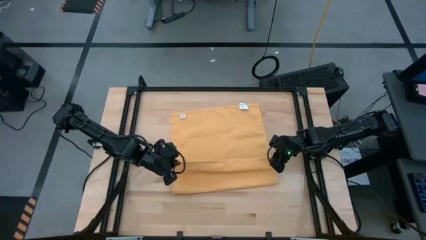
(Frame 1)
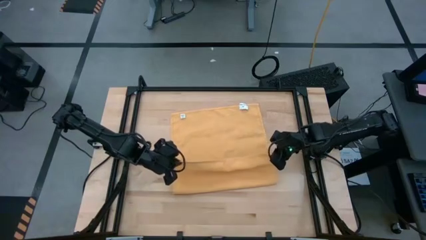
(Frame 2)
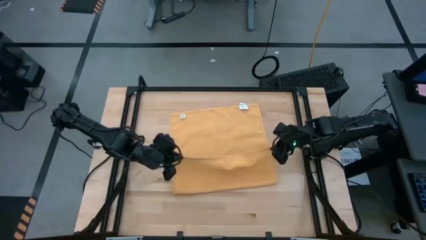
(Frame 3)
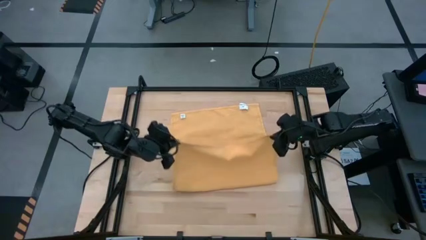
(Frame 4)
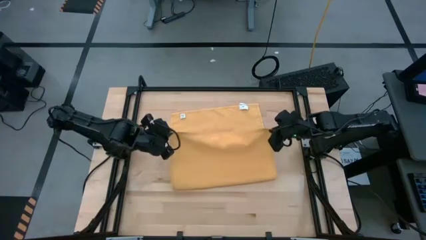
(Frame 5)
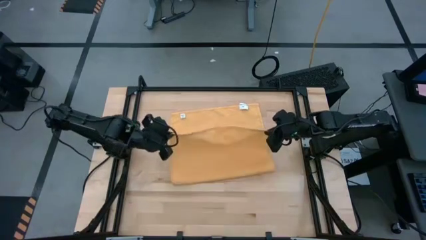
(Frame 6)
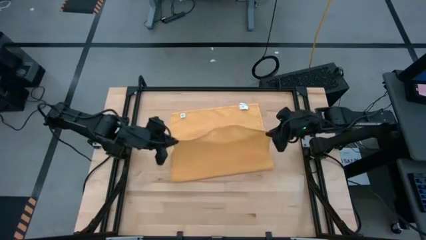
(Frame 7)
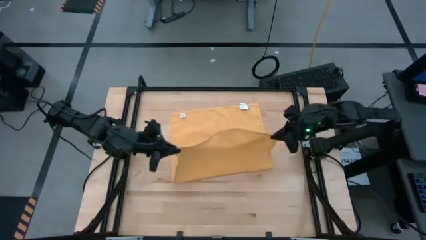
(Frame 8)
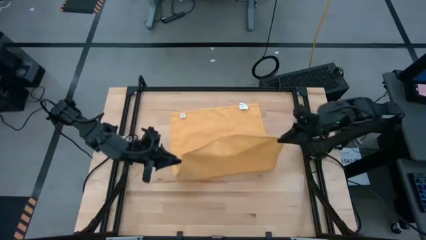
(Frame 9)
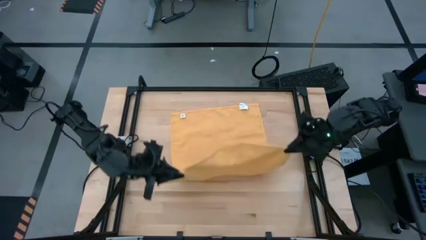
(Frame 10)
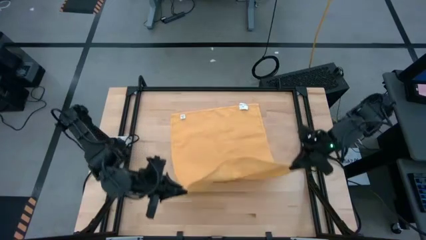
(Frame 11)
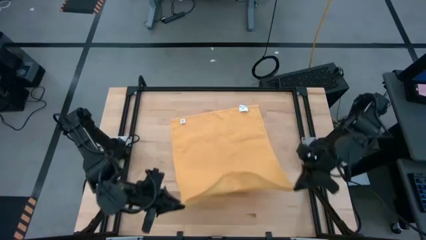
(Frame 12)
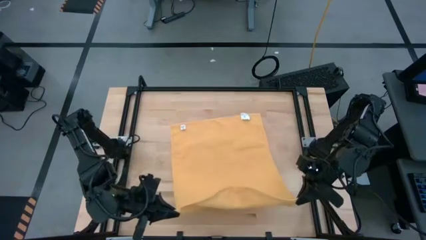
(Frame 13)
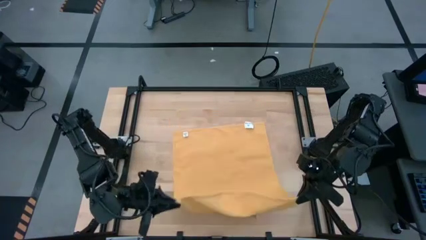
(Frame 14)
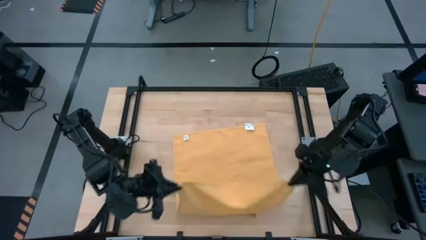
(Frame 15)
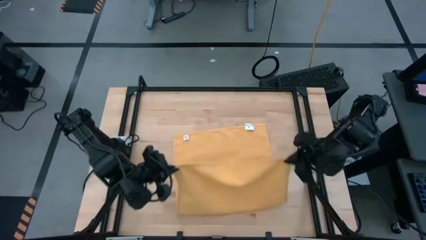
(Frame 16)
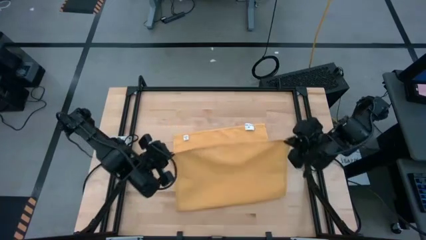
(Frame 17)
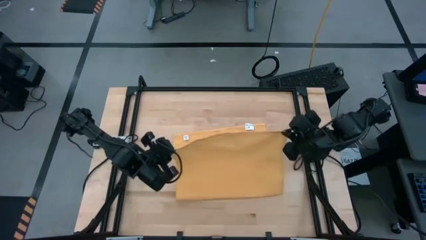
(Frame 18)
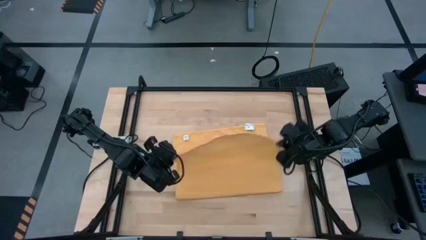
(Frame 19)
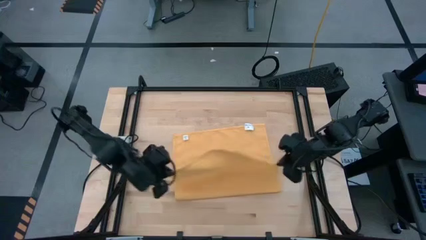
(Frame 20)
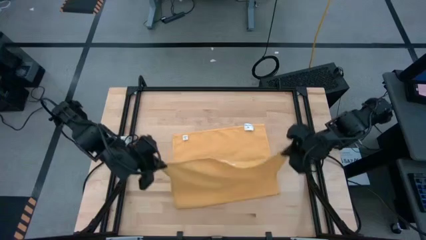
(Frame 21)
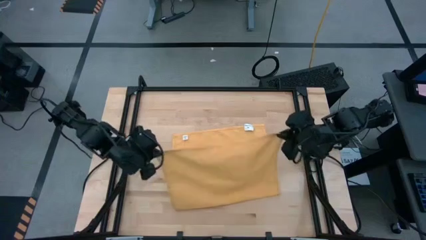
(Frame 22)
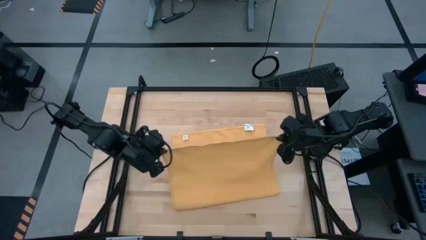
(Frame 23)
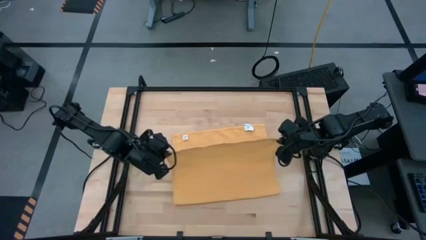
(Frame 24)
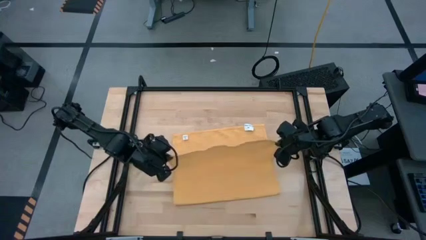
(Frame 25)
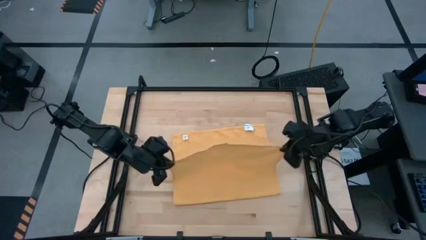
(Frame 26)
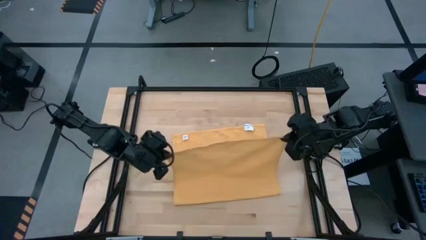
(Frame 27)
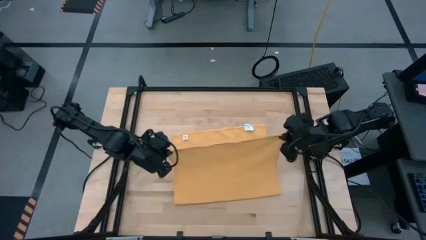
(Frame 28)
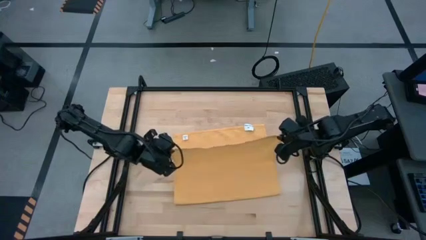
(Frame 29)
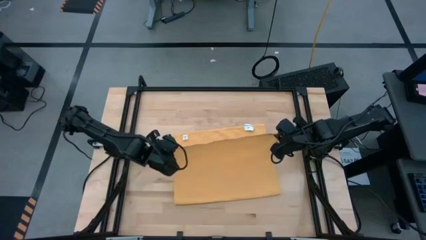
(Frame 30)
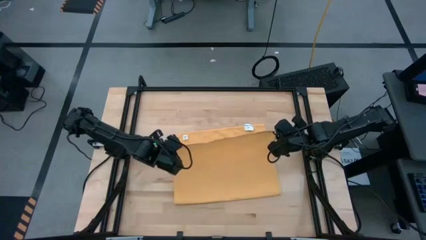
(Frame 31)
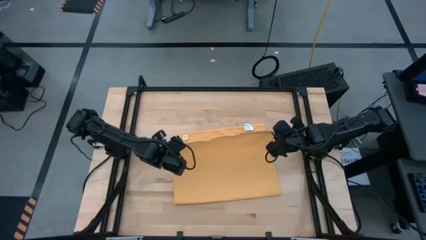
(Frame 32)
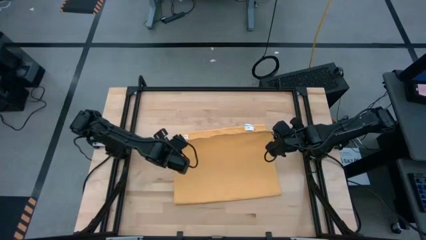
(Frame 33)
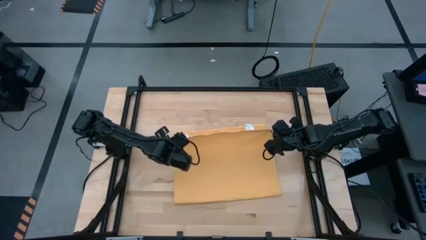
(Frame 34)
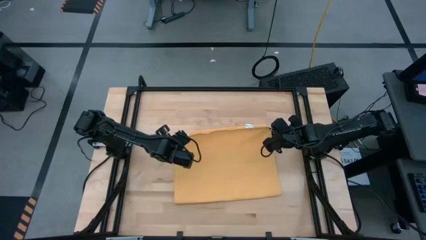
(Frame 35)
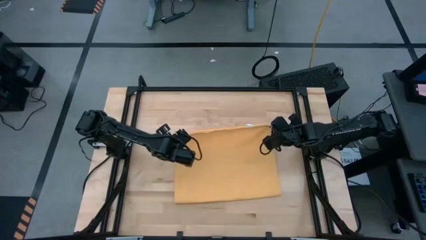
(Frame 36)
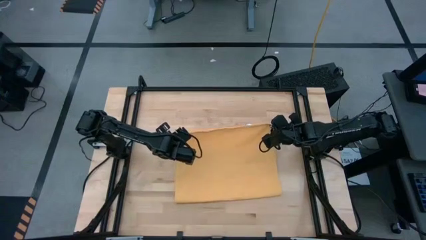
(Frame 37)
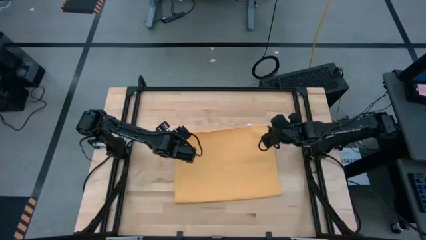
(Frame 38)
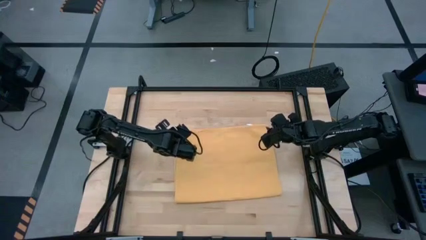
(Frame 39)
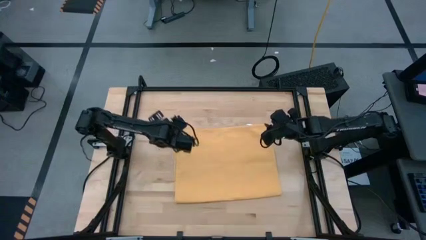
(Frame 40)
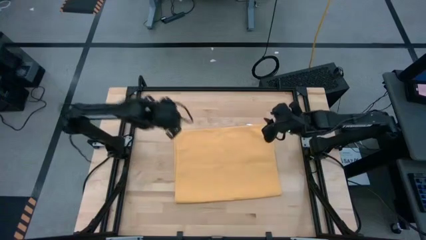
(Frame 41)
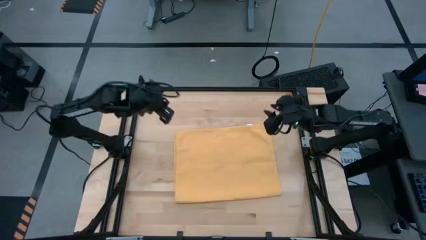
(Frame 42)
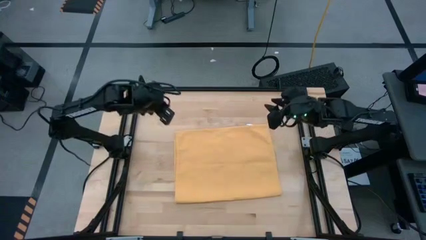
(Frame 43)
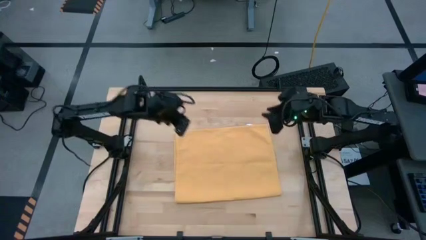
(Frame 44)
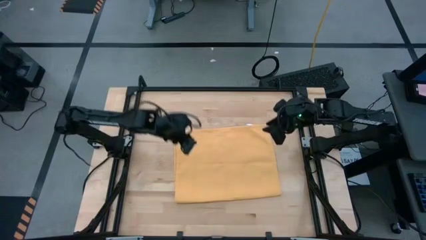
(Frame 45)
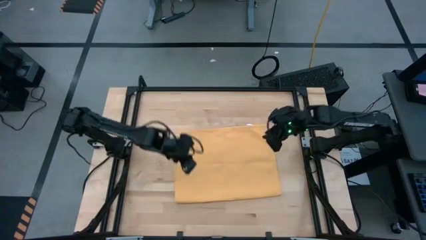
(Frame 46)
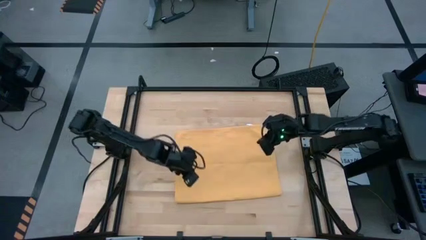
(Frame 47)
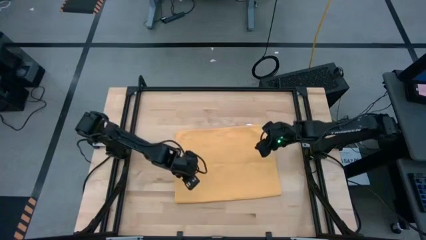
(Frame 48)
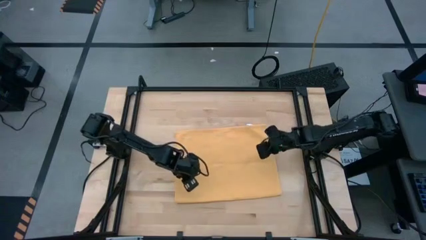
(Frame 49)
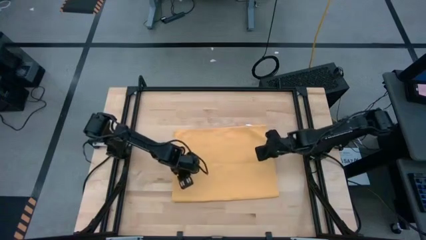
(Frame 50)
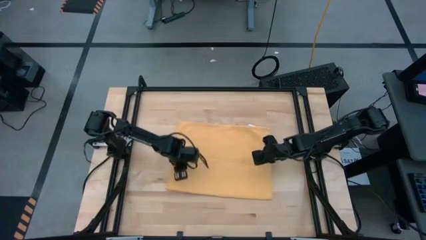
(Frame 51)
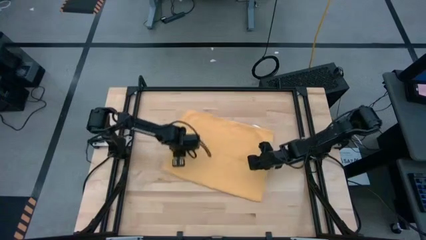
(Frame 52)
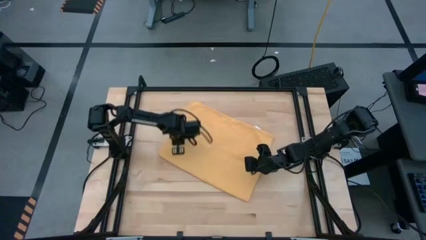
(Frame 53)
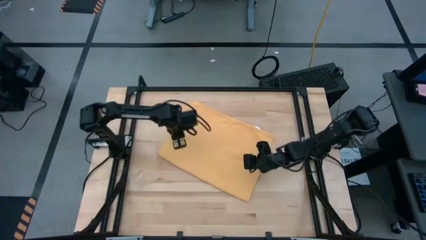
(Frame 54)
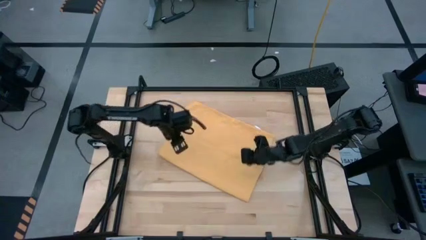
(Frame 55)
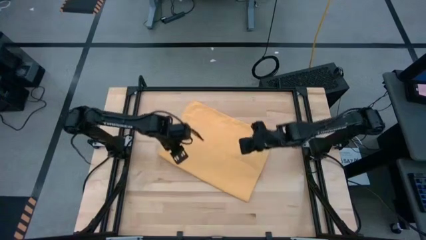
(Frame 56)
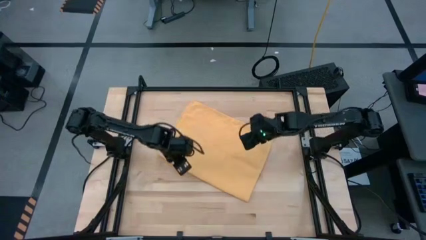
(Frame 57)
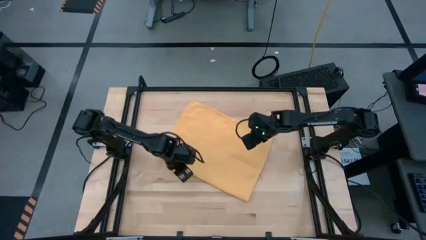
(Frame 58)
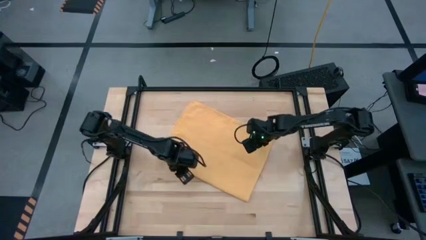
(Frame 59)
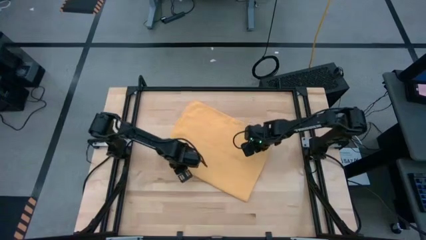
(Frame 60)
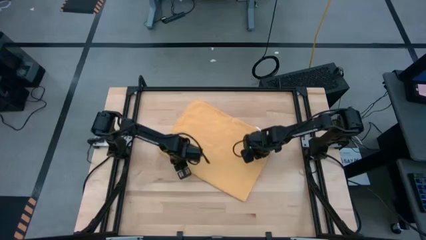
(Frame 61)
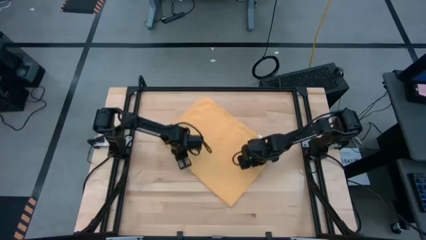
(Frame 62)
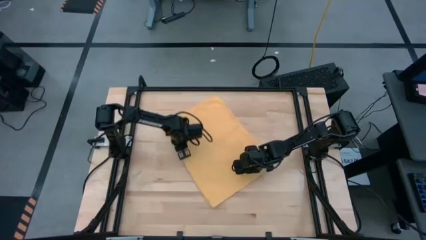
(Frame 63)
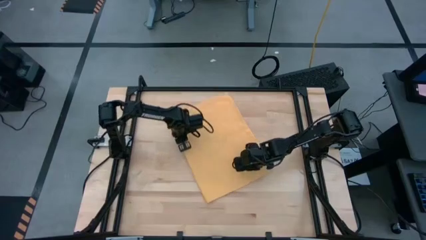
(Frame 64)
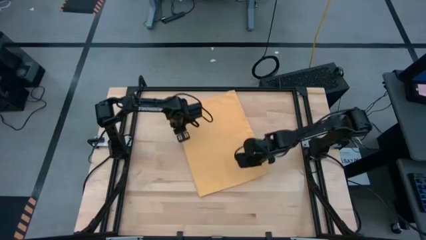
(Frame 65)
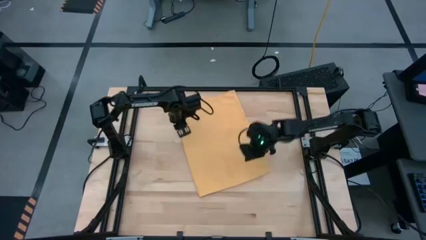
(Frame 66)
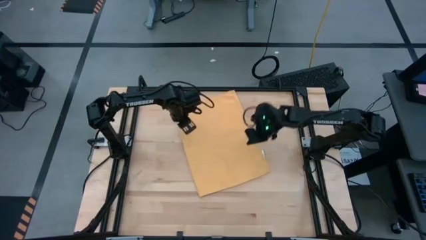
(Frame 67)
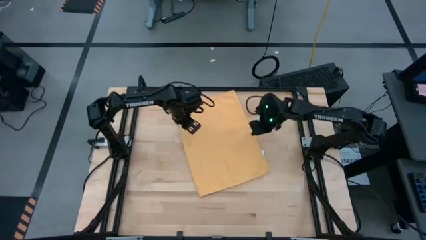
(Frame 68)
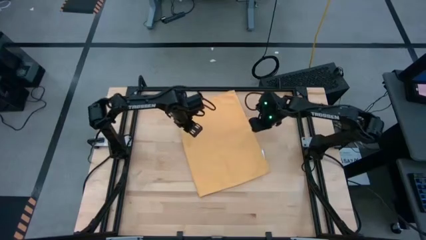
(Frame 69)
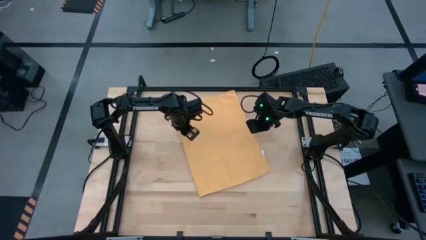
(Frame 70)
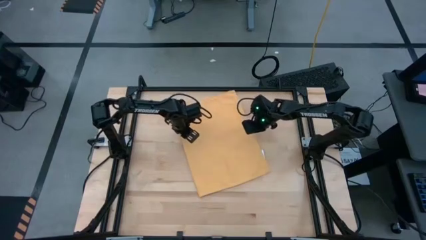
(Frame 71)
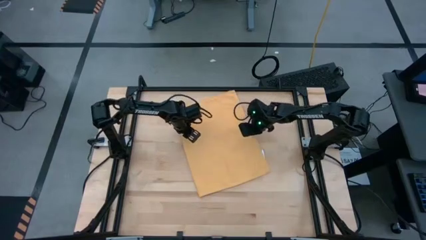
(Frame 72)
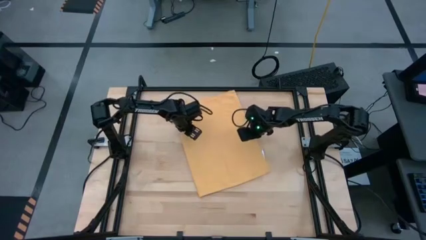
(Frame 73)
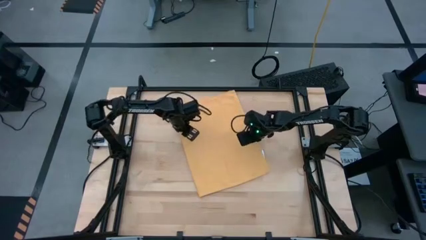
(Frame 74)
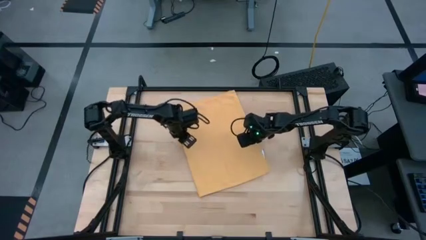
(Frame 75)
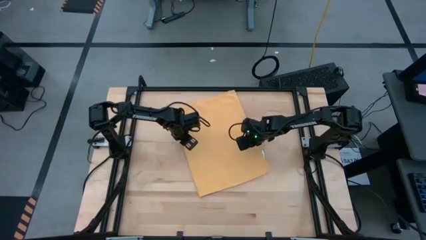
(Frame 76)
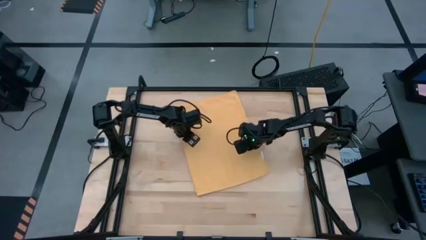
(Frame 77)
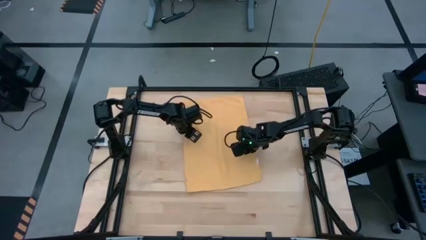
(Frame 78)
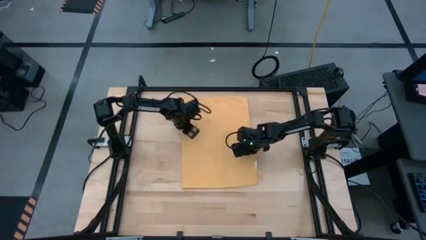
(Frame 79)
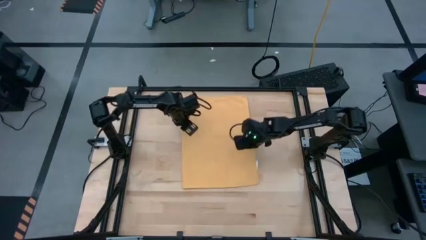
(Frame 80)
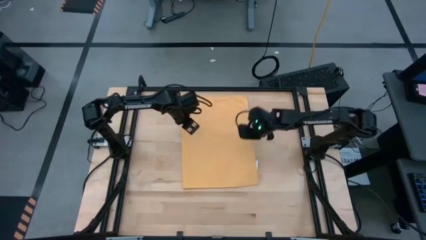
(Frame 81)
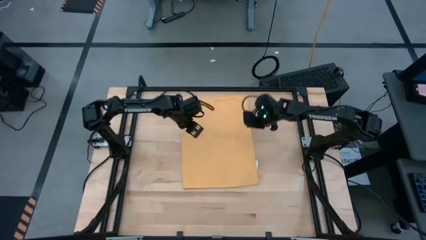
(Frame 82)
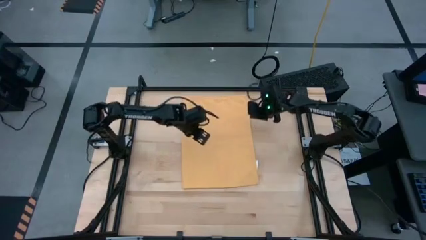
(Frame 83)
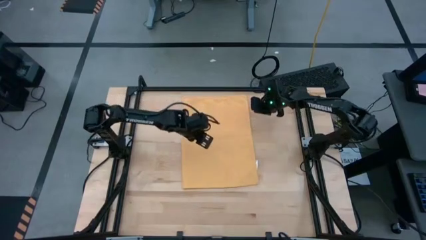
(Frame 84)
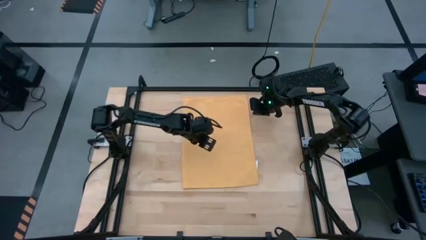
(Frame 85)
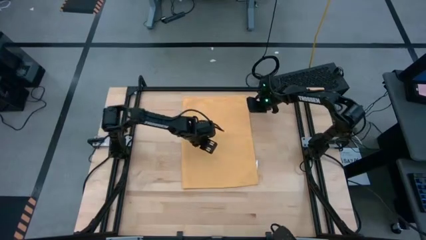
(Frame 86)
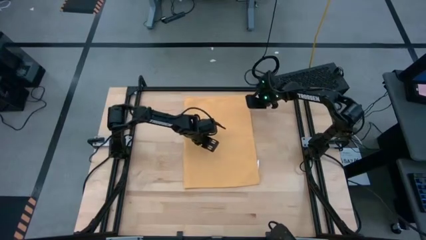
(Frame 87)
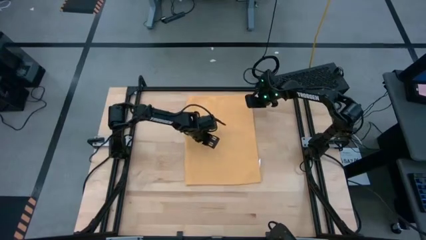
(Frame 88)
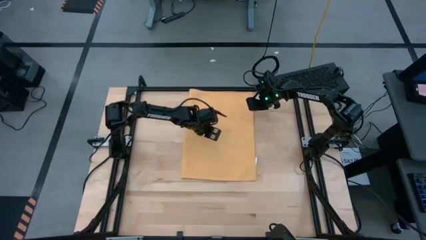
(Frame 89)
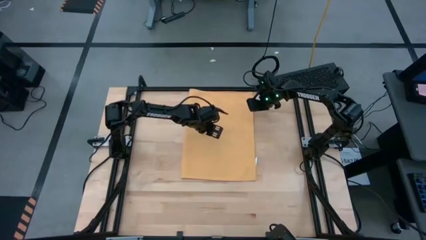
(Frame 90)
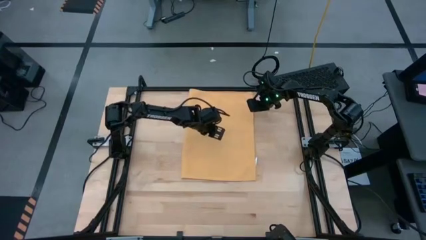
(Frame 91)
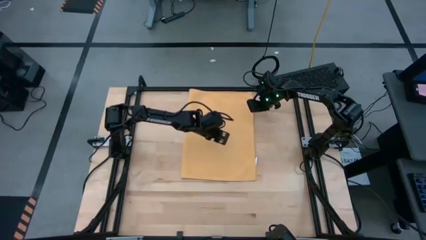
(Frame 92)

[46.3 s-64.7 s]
Task: Roll towel
Roll the yellow towel
